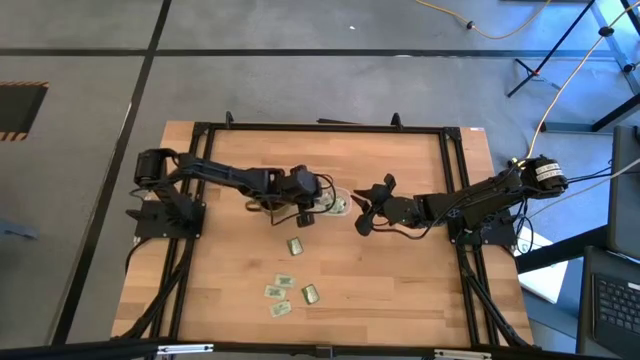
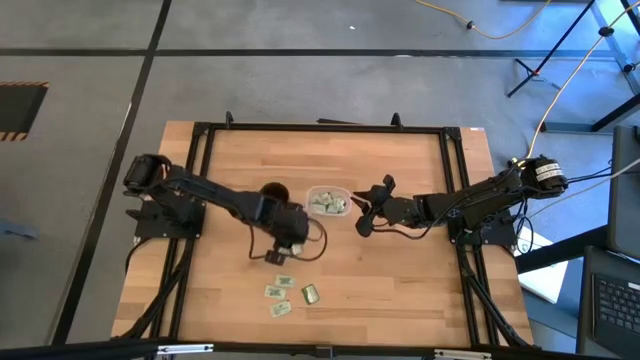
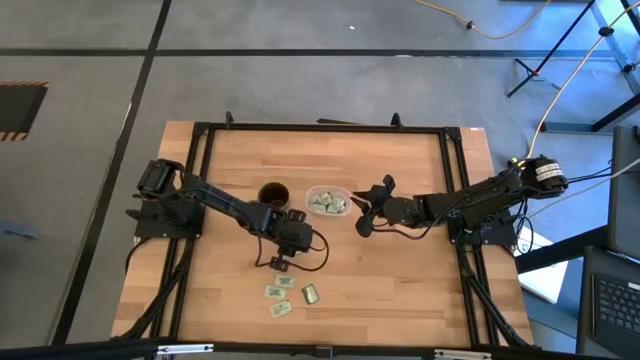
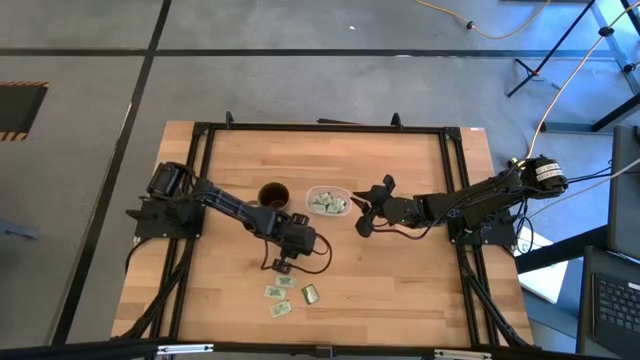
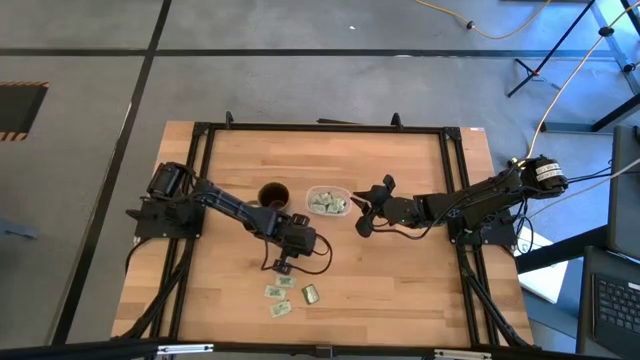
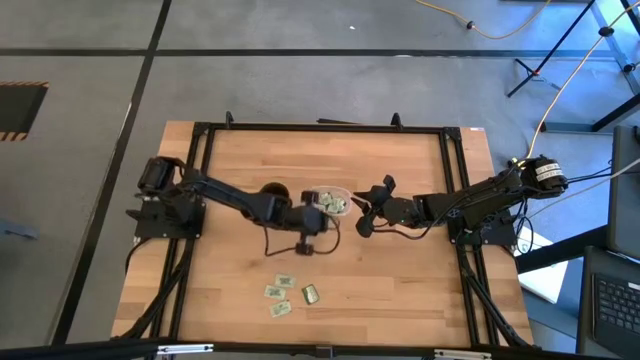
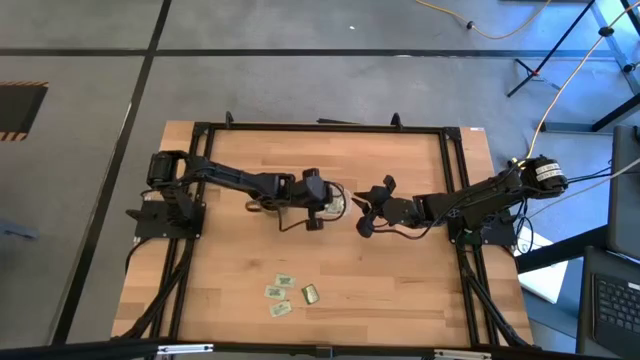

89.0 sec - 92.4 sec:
Task: Pick and place items into bin
Put the green truvia pack into the transparent bin

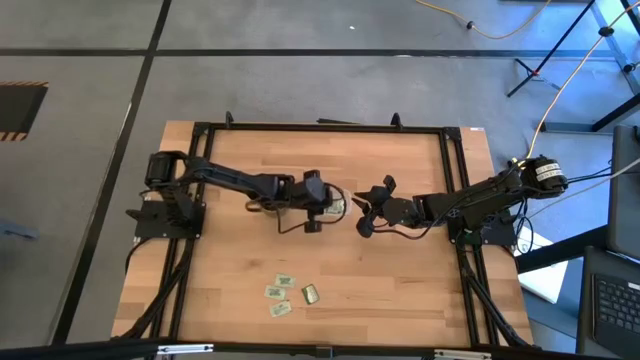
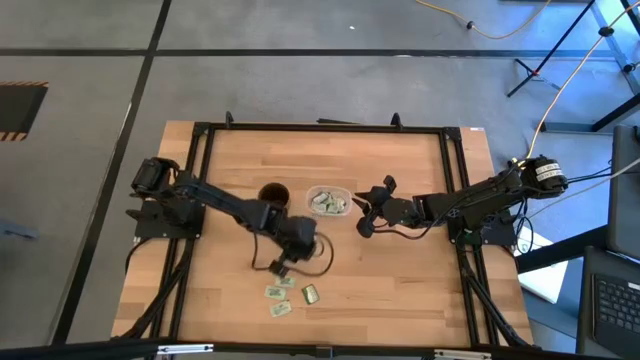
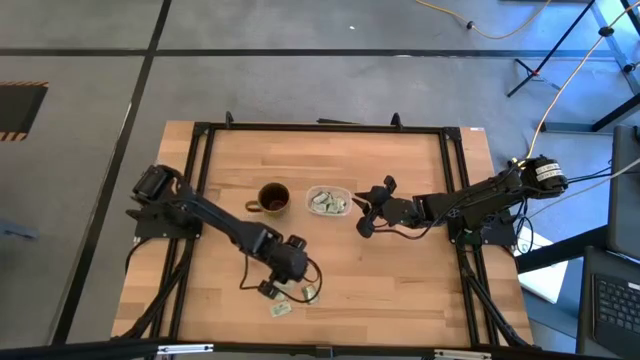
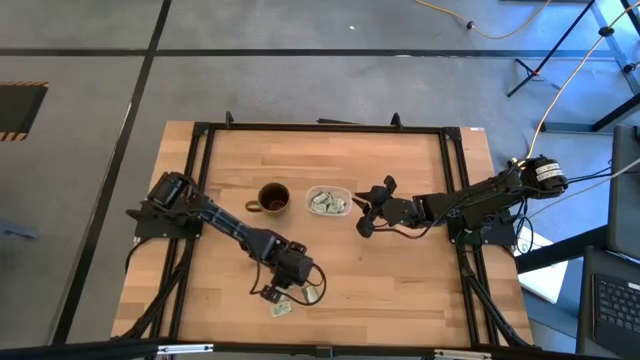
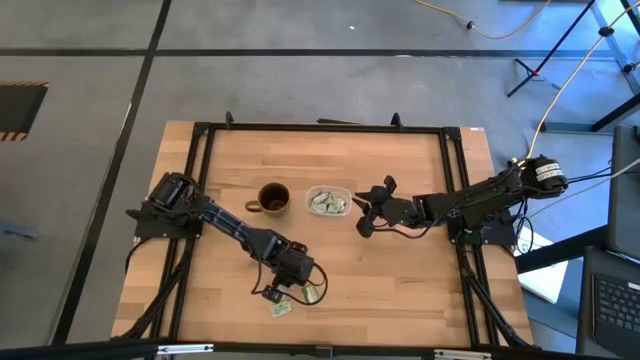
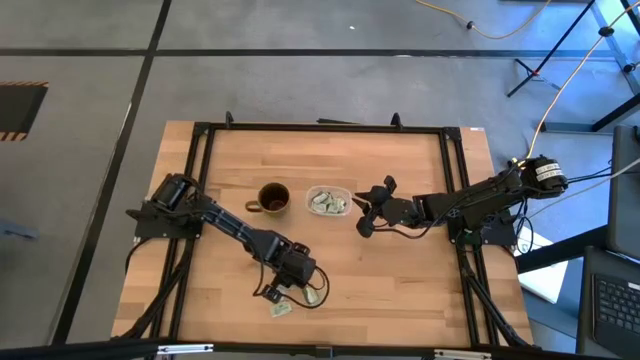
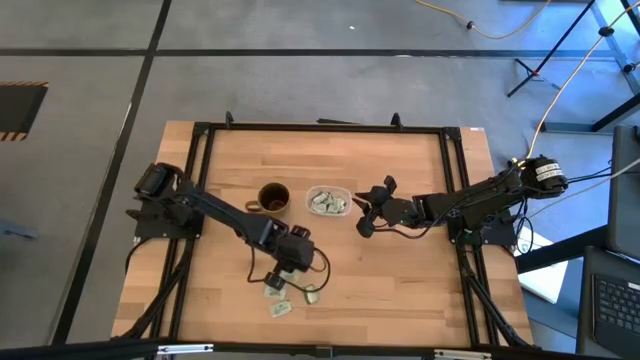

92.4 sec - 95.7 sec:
Put the light green stevia pack into the transparent bin

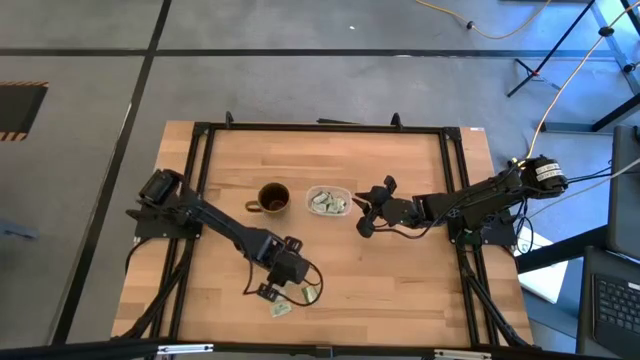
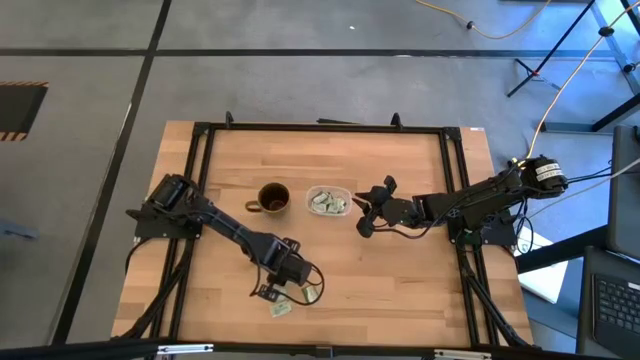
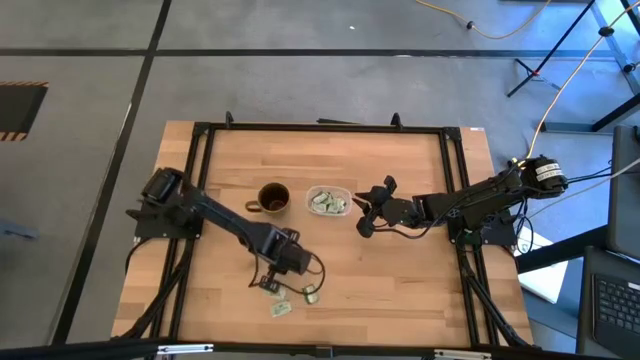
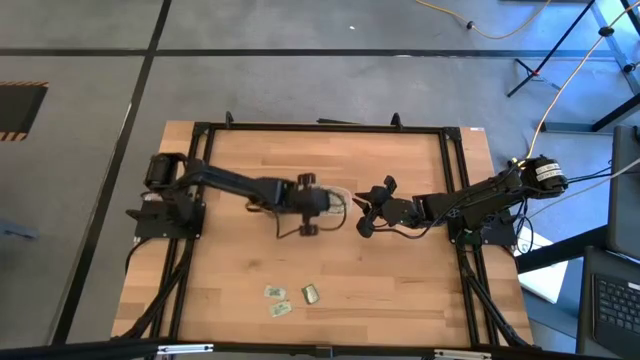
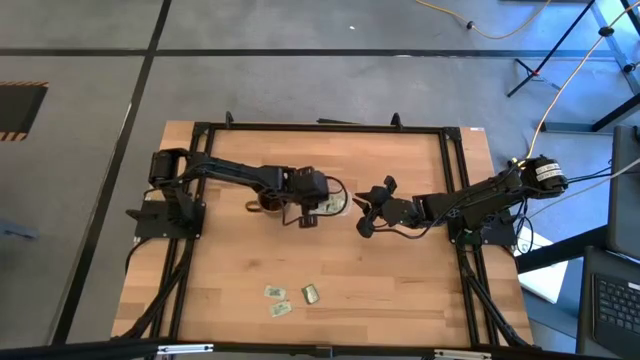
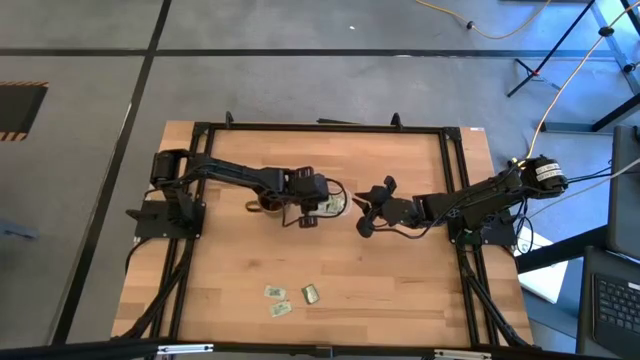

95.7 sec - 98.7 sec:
Put the light green stevia pack into the transparent bin

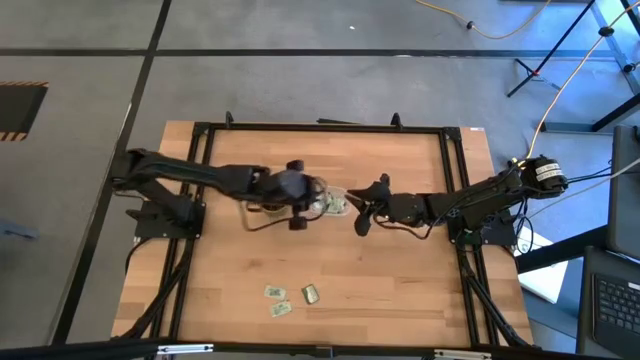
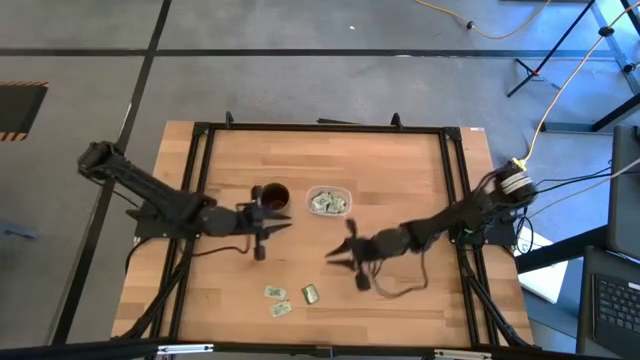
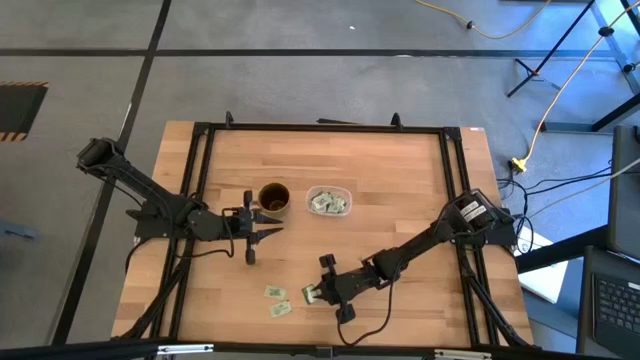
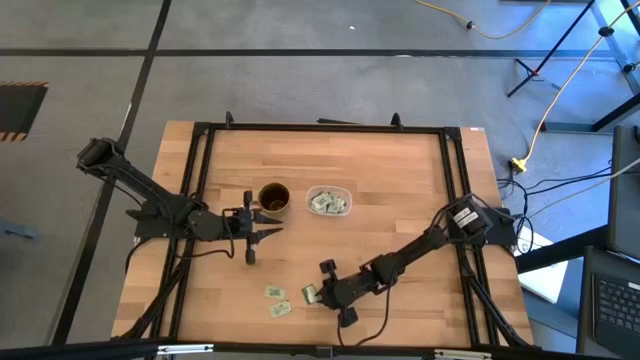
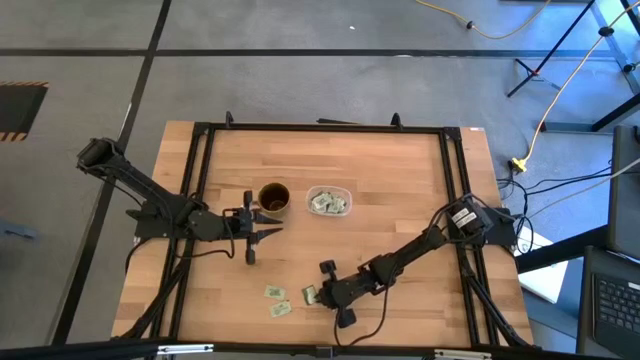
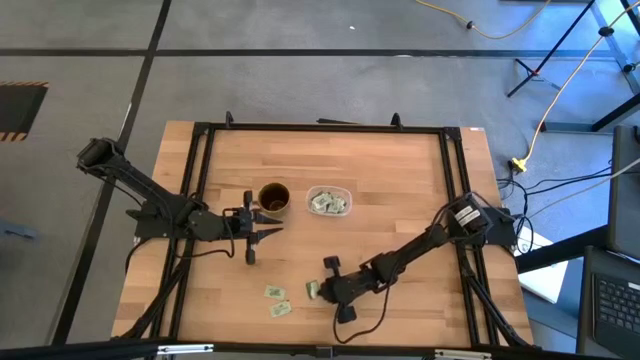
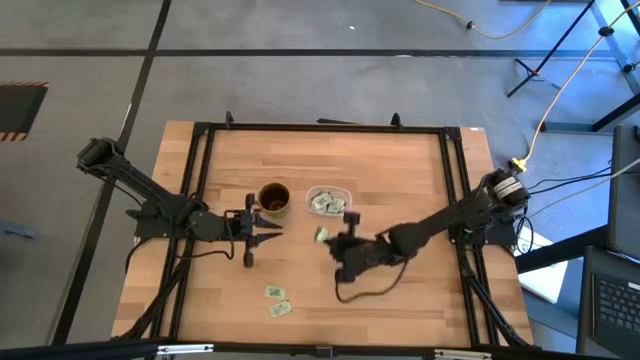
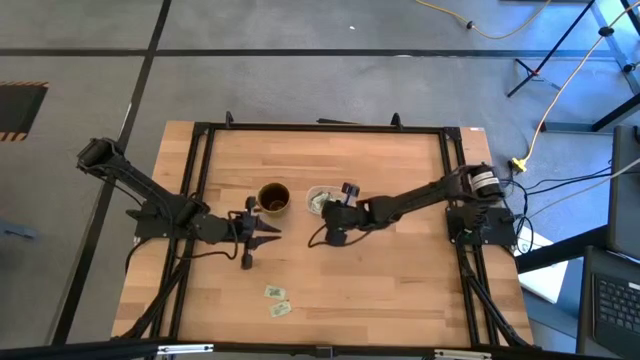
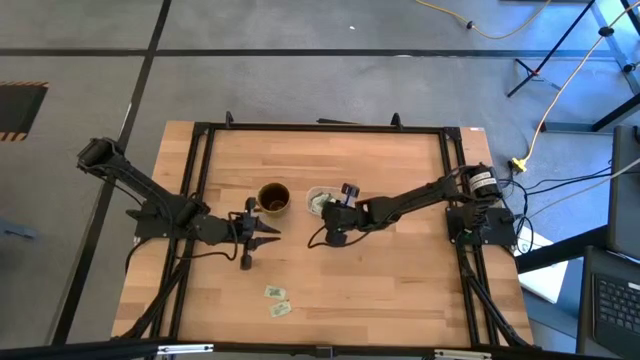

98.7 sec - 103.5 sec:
Put the green truvia pack into the transparent bin

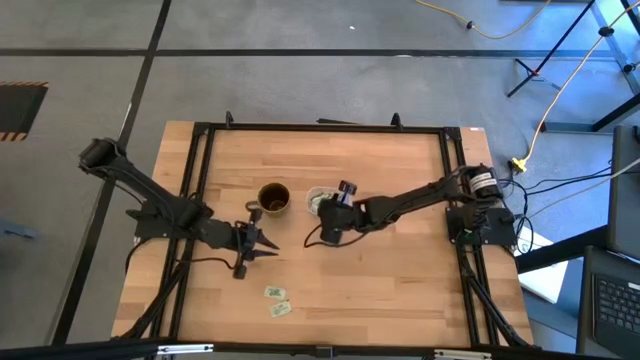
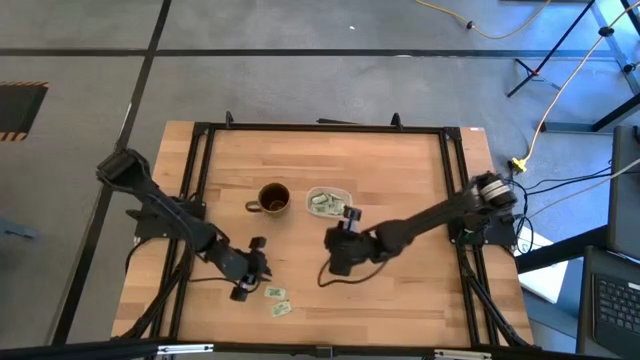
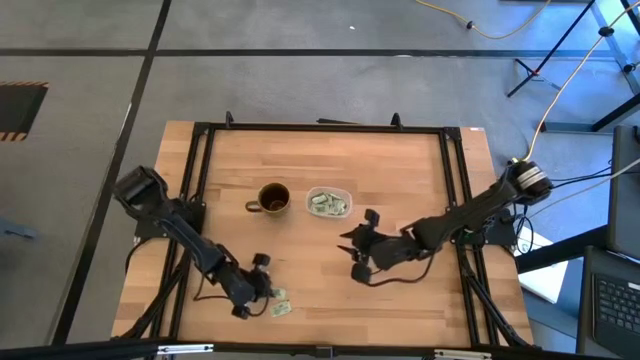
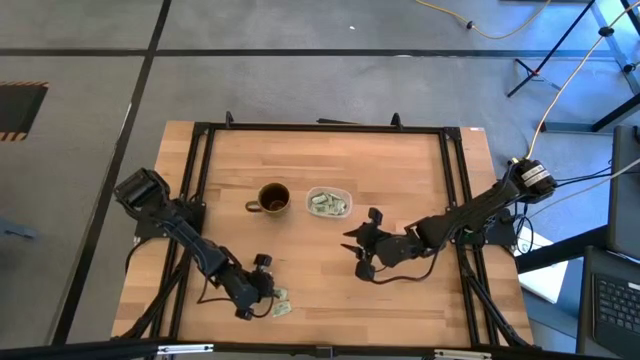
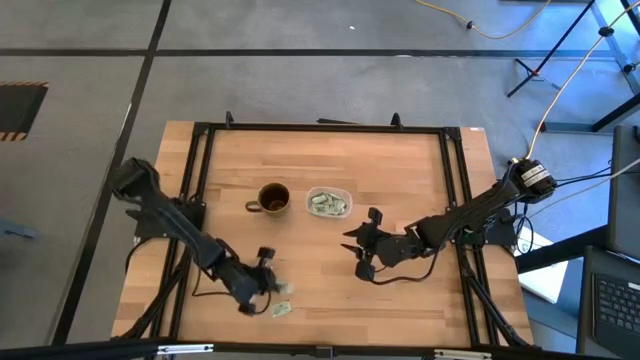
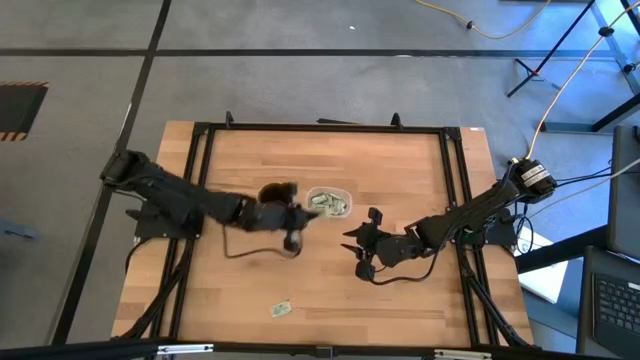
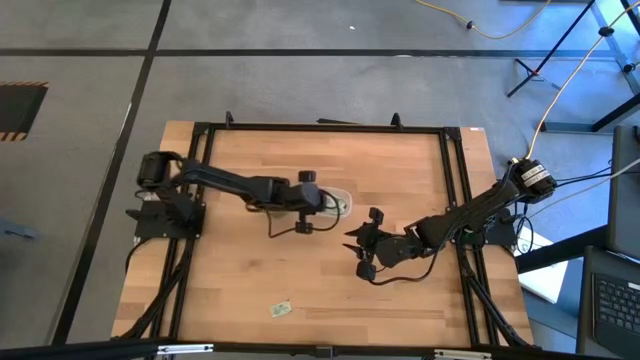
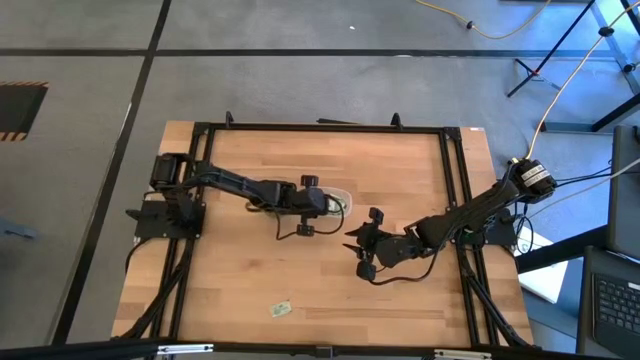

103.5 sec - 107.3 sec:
Put the light green stevia pack into the transparent bin

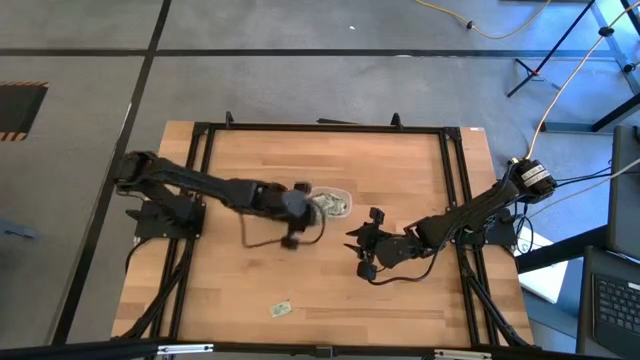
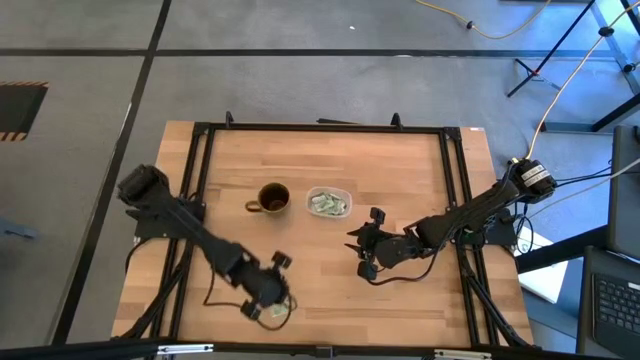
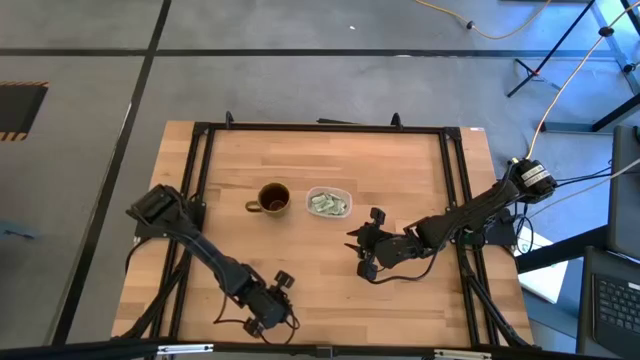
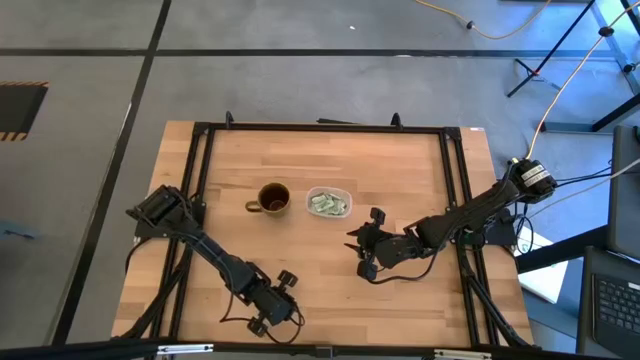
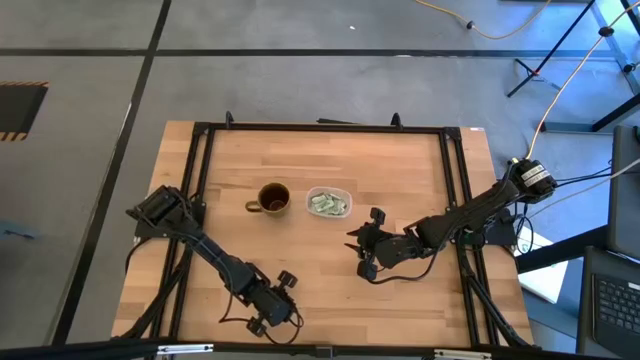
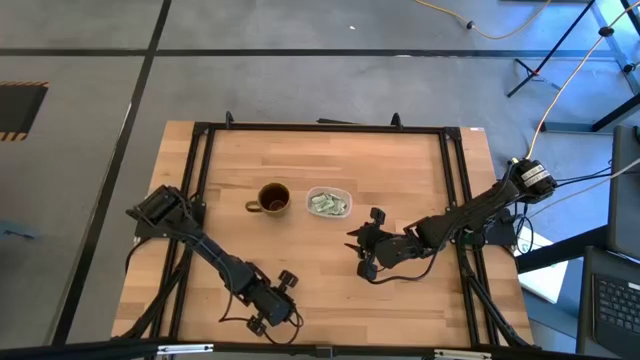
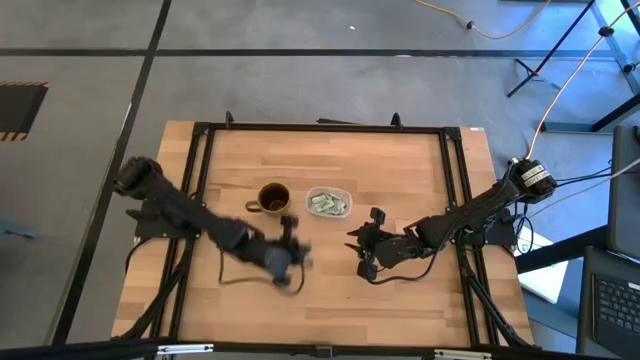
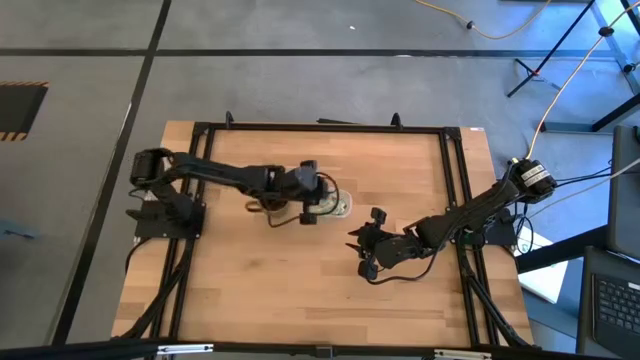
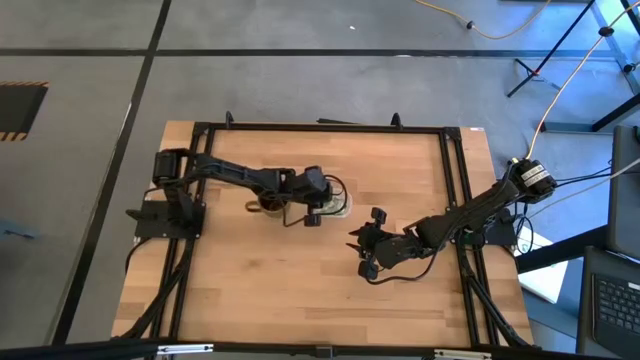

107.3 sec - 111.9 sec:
Put the light green stevia pack into the transparent bin
